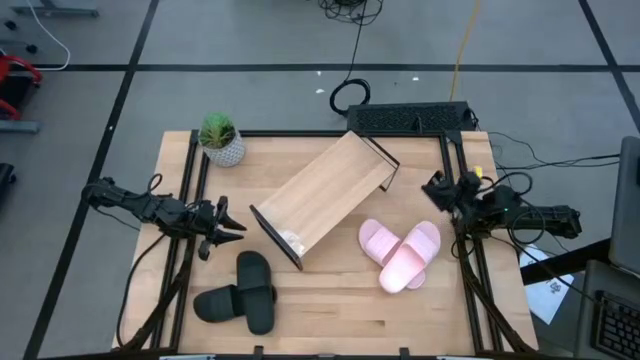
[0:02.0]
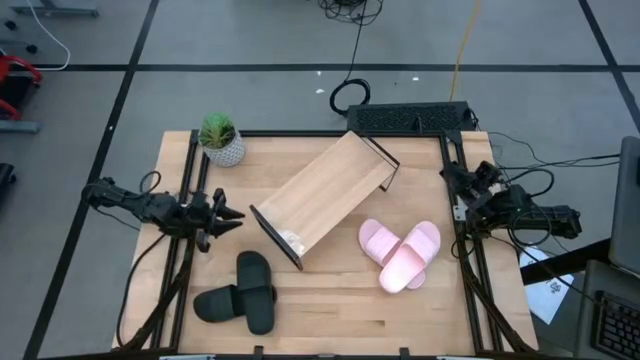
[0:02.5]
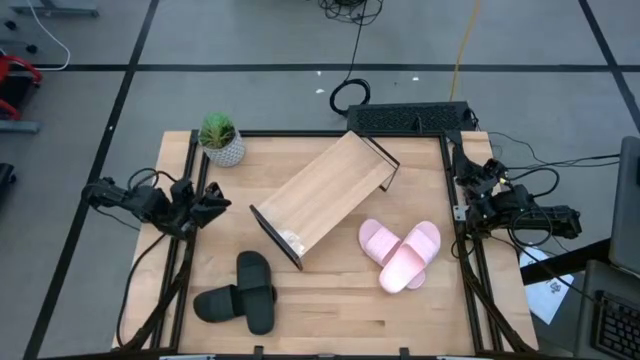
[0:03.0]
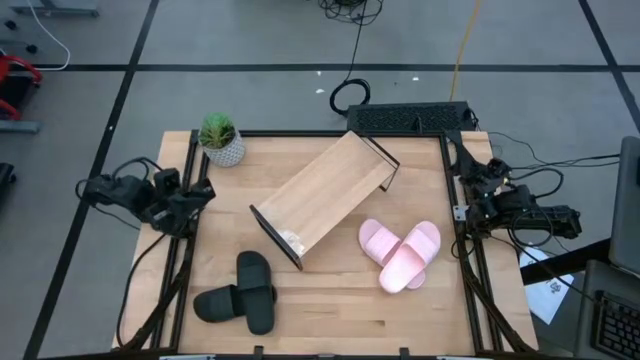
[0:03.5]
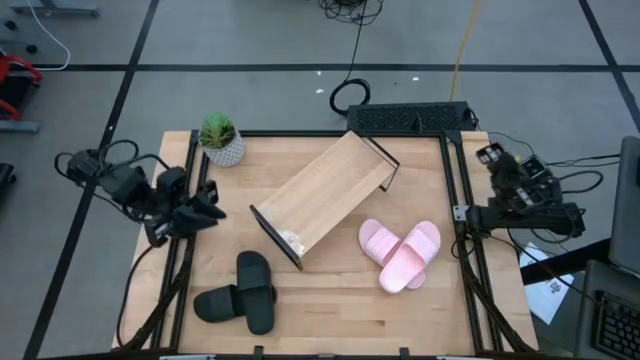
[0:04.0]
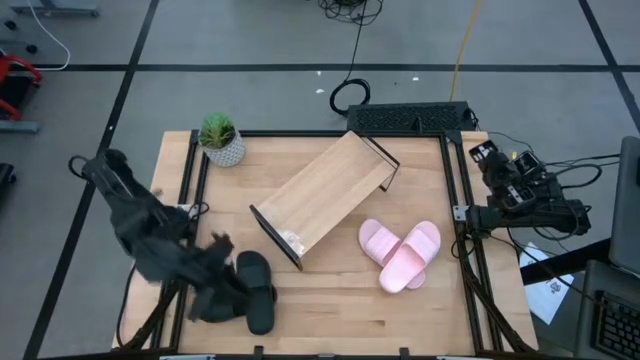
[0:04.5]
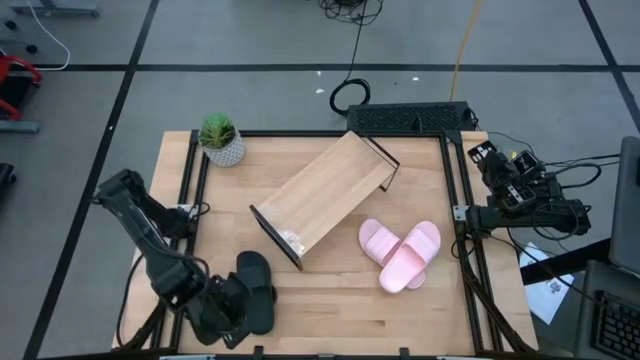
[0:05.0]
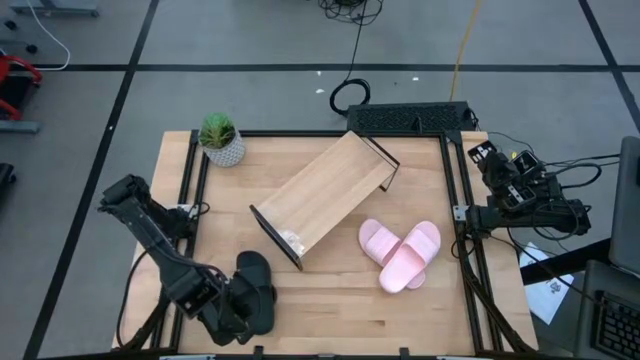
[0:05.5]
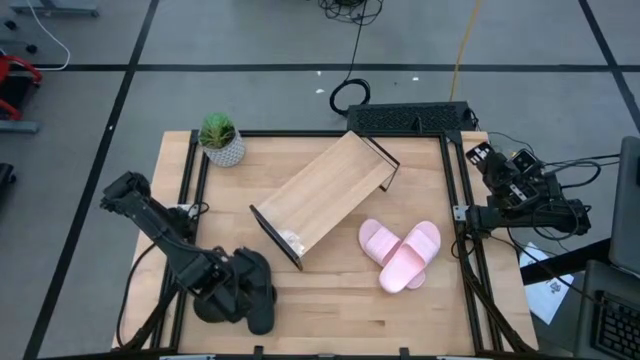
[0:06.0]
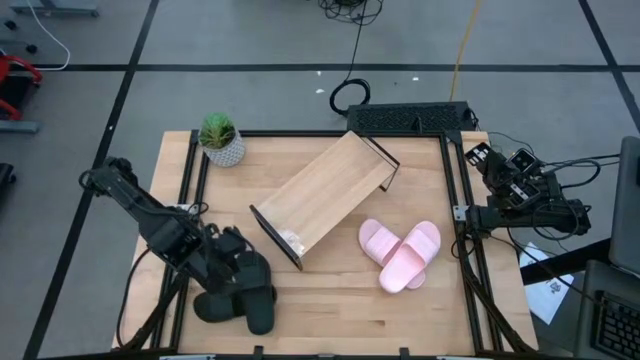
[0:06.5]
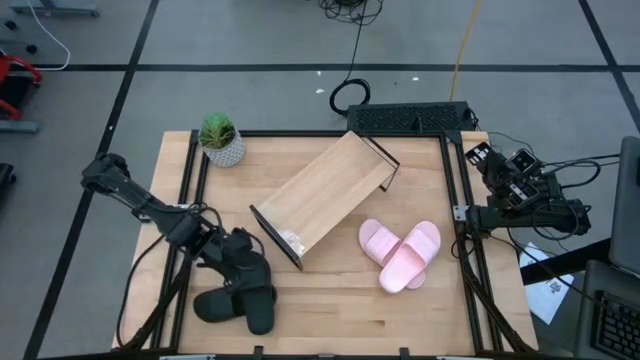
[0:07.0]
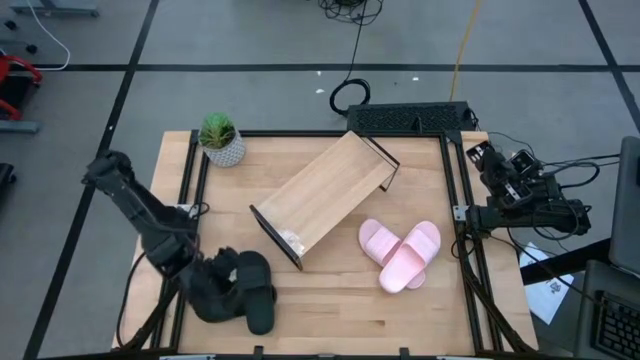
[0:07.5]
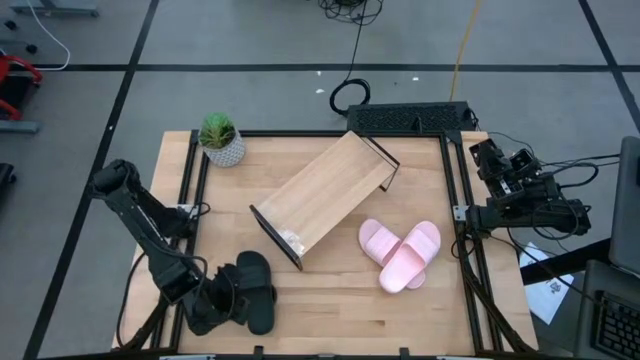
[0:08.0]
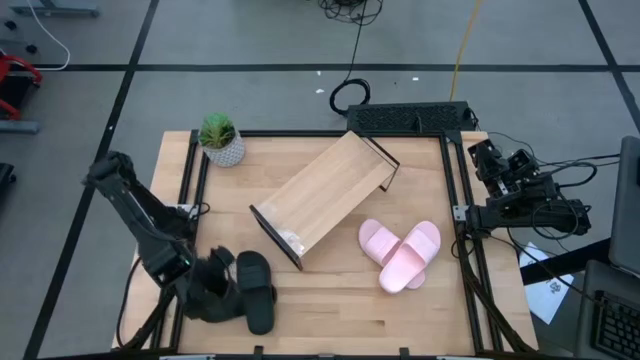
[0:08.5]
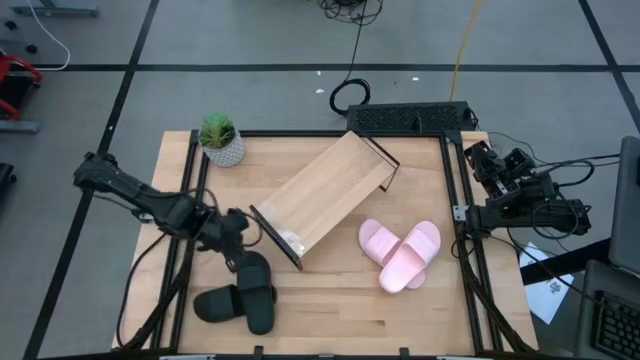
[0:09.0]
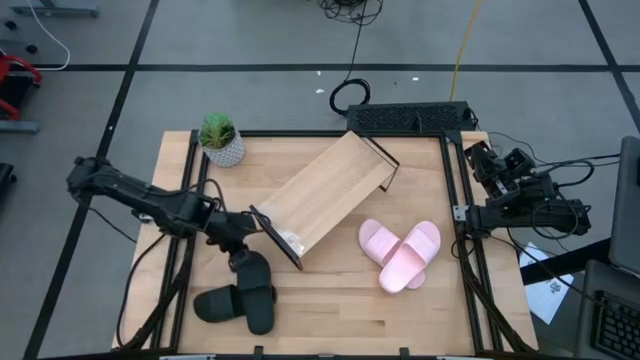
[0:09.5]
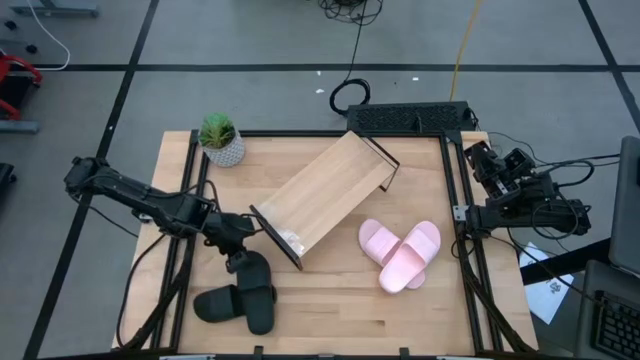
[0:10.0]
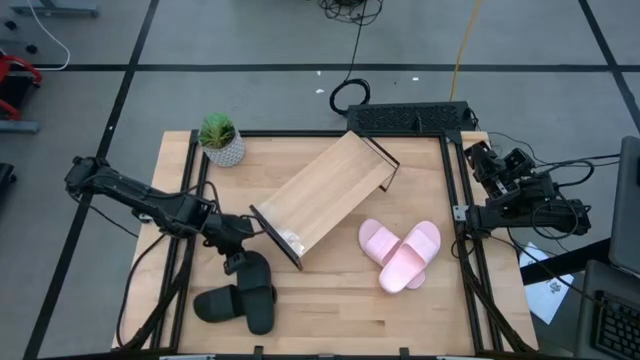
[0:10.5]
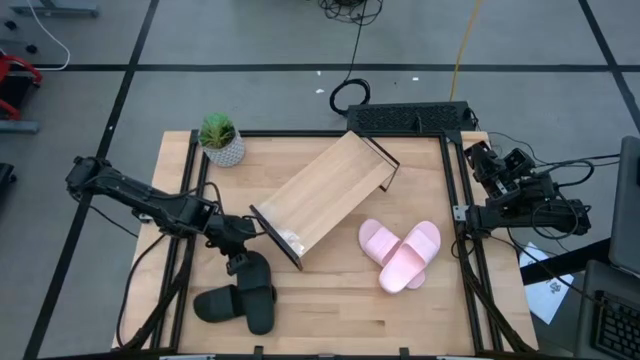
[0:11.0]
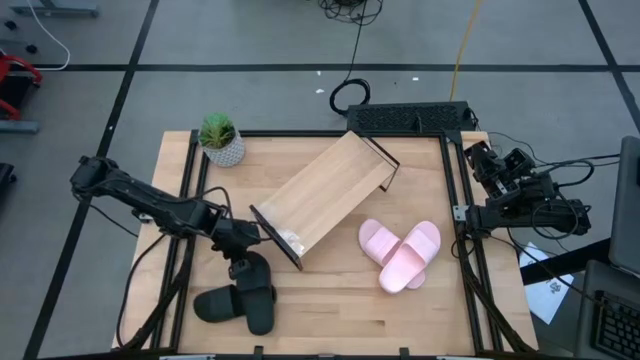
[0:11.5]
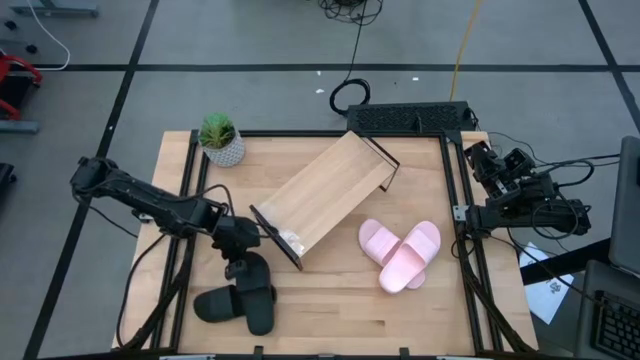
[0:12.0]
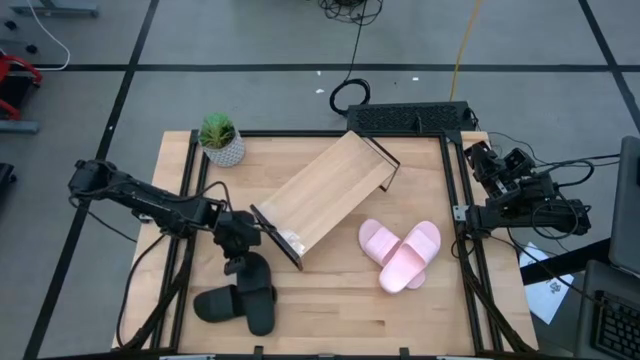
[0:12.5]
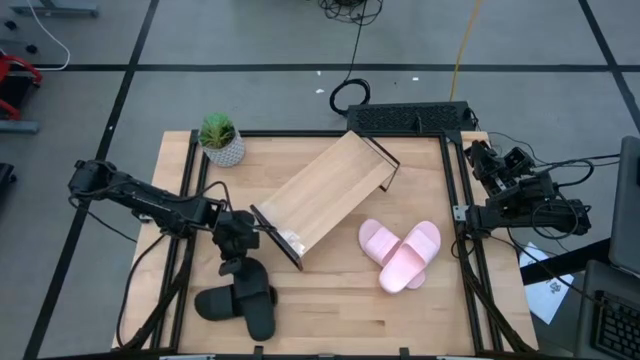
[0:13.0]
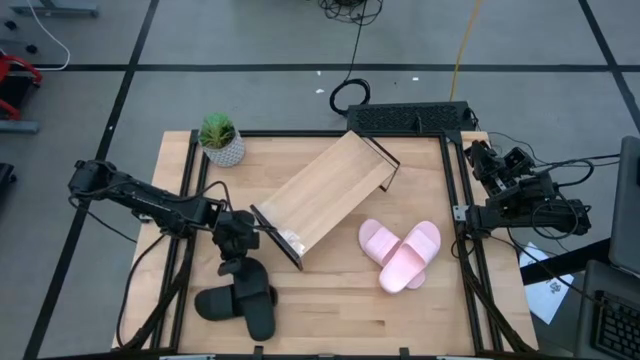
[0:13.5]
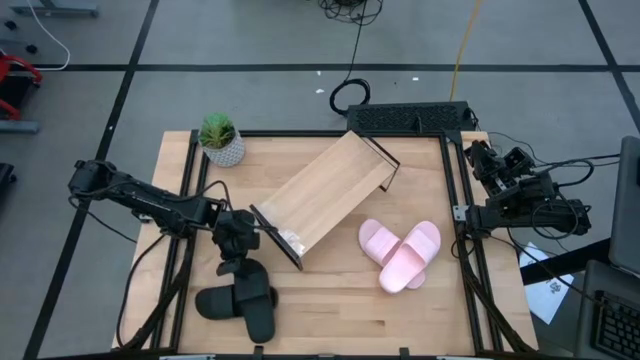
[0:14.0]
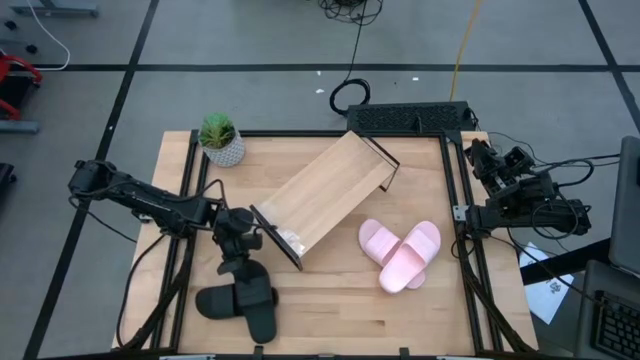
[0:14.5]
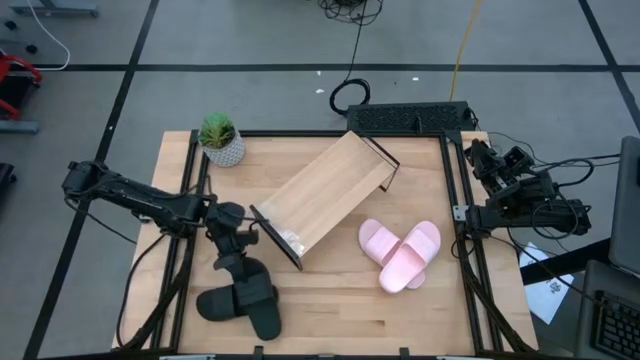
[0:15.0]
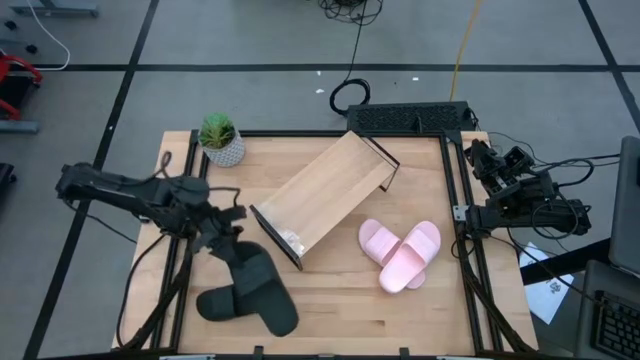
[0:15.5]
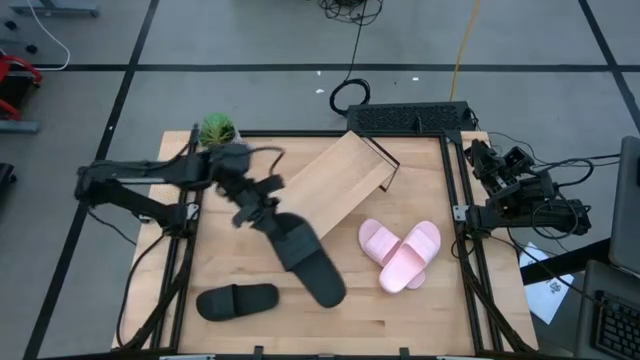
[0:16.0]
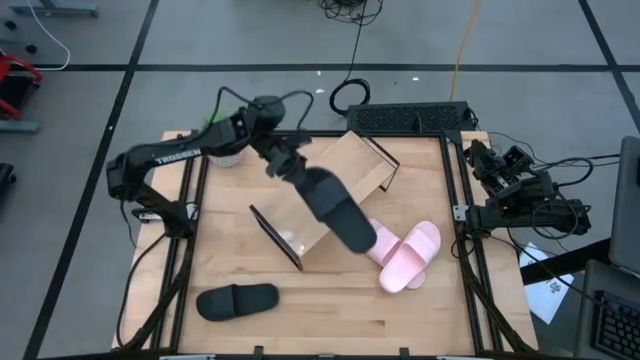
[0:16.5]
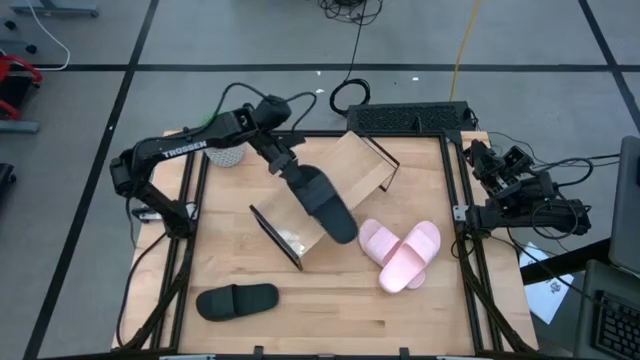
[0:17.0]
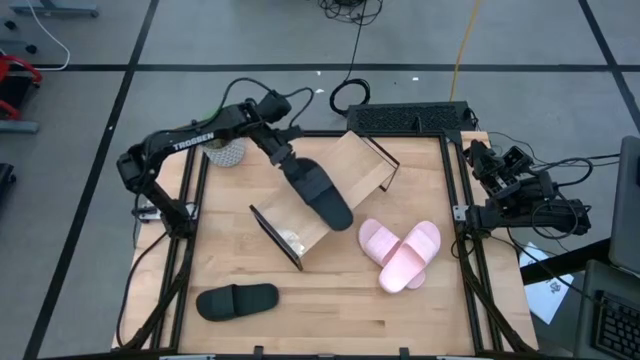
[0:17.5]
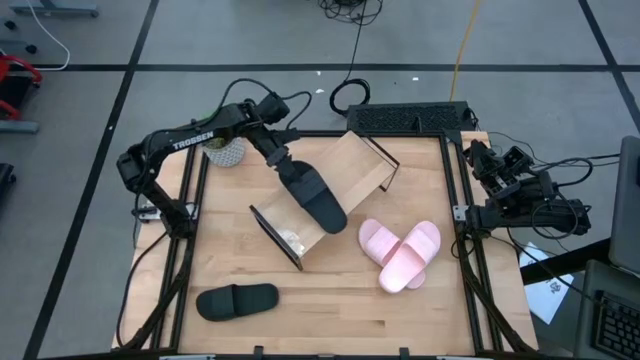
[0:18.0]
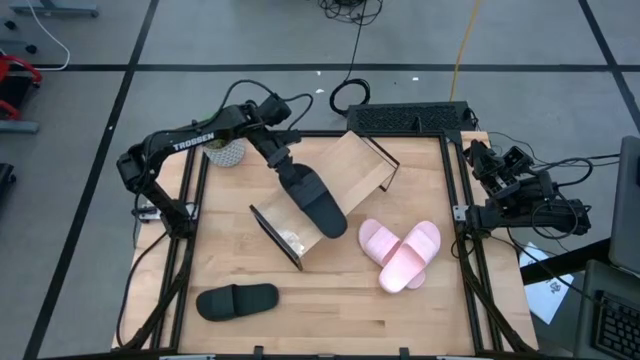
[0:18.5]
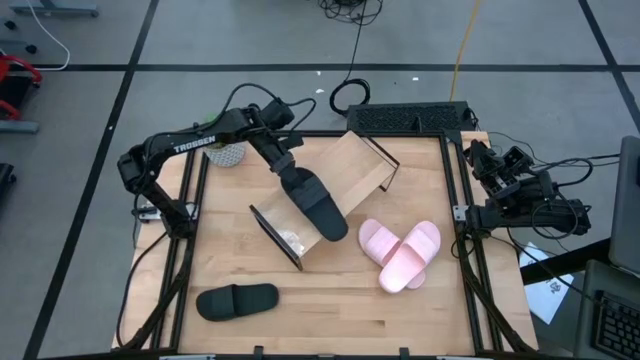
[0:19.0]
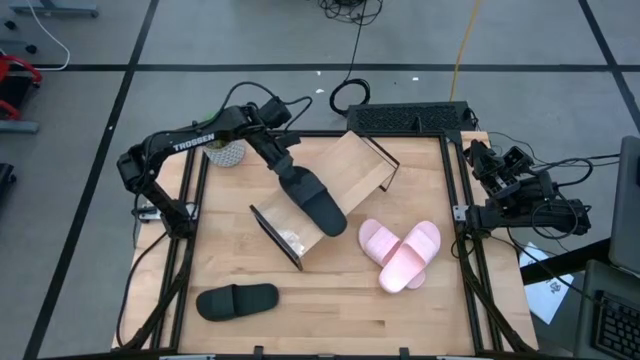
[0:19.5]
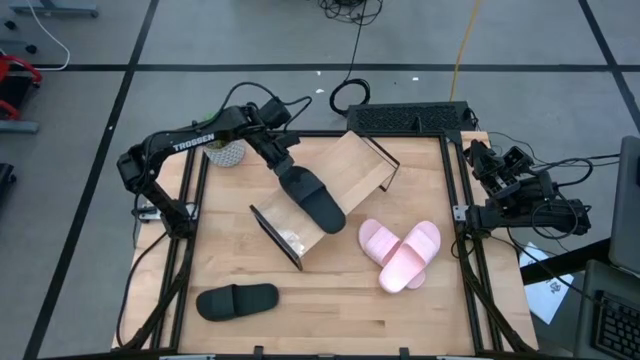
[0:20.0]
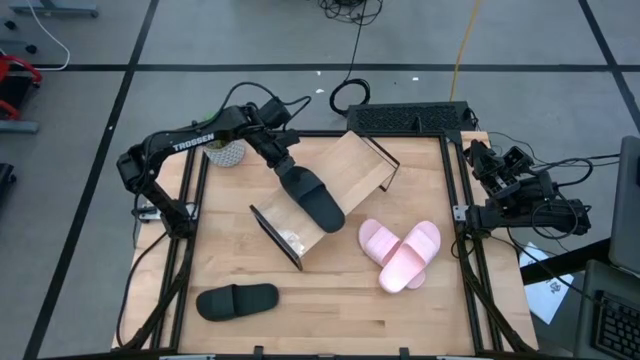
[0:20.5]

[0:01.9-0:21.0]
Task: Pick and place slides into the shelf
Put the top black slide on the shelf
